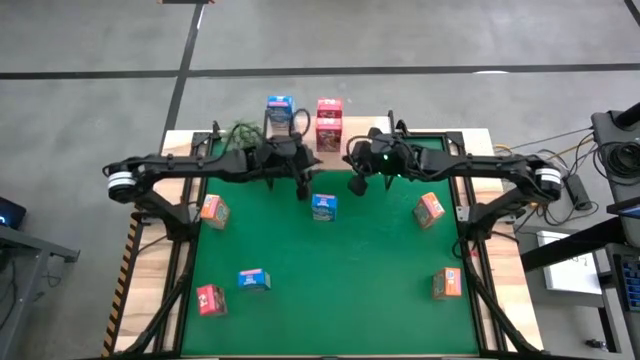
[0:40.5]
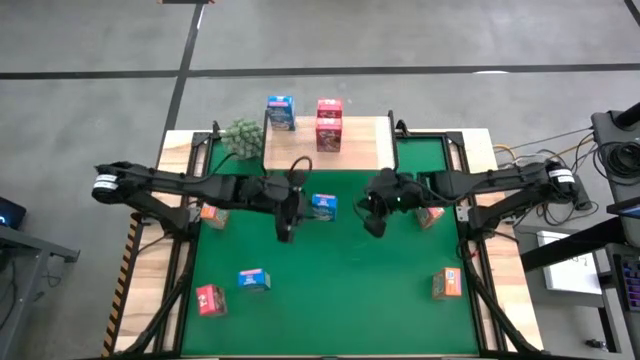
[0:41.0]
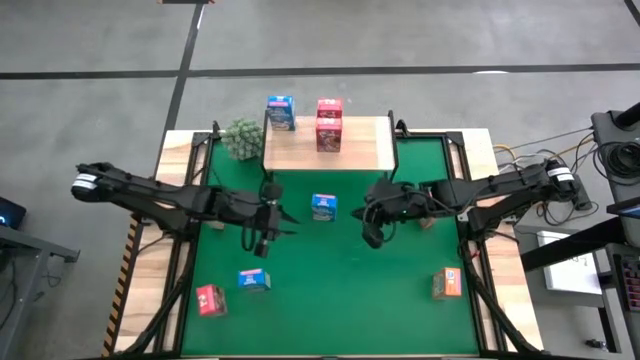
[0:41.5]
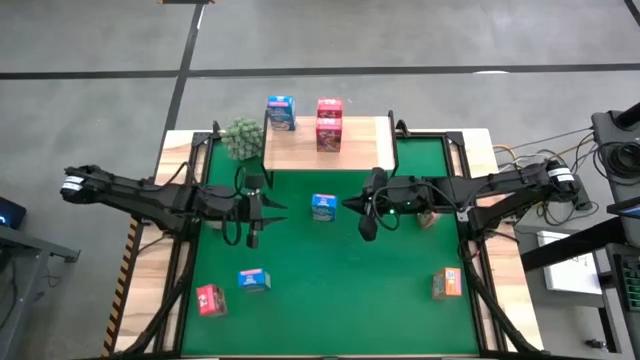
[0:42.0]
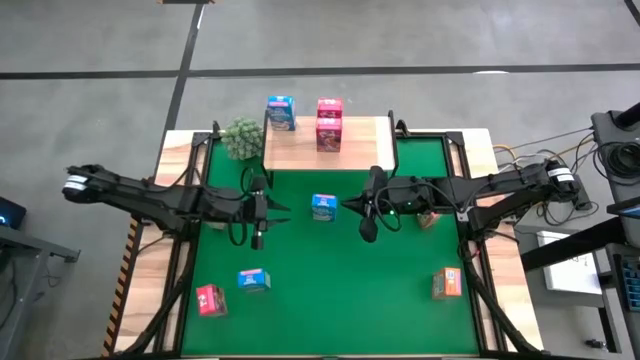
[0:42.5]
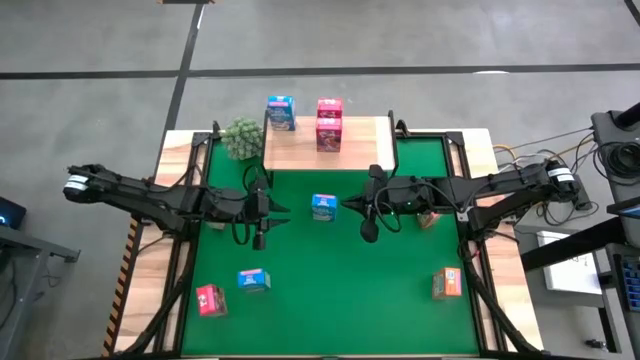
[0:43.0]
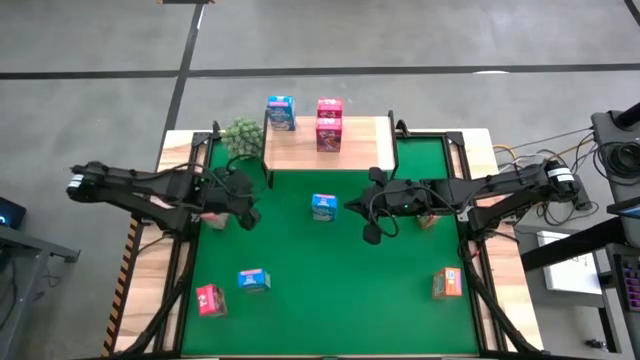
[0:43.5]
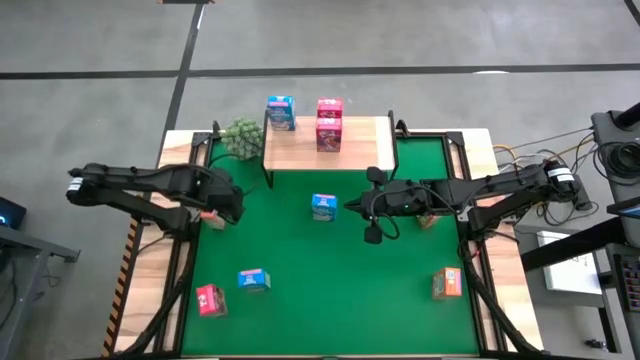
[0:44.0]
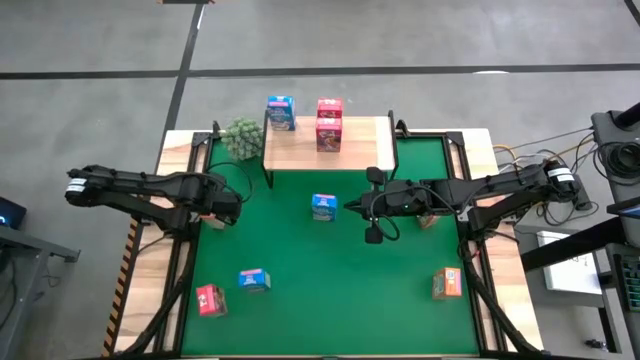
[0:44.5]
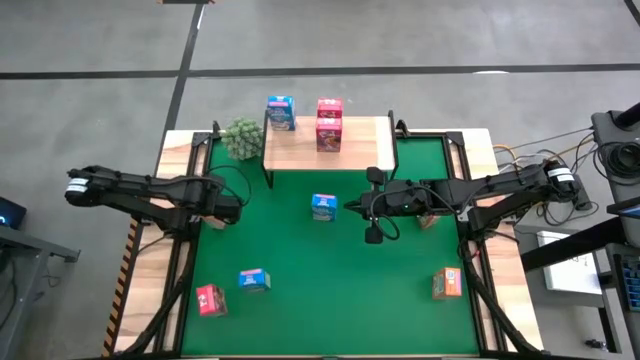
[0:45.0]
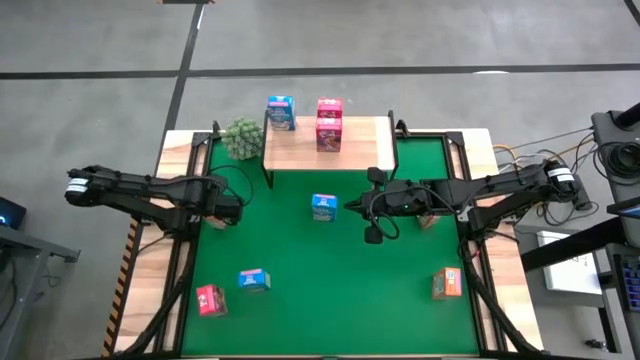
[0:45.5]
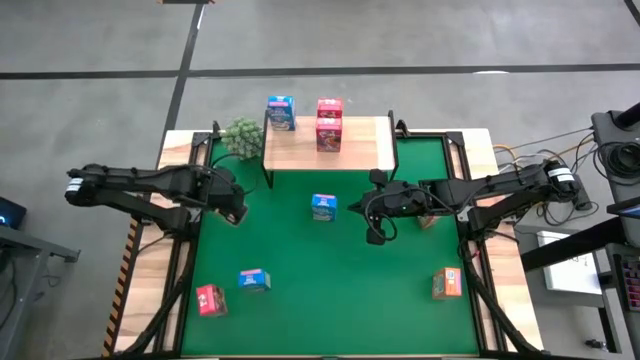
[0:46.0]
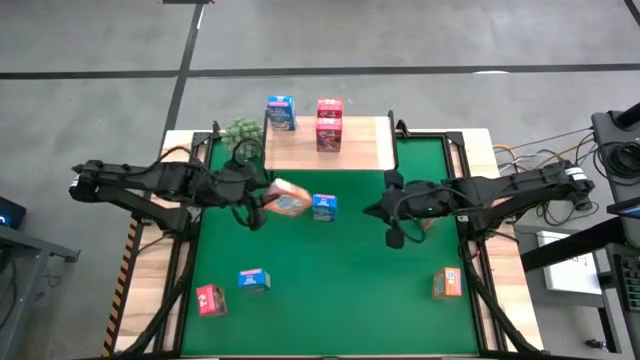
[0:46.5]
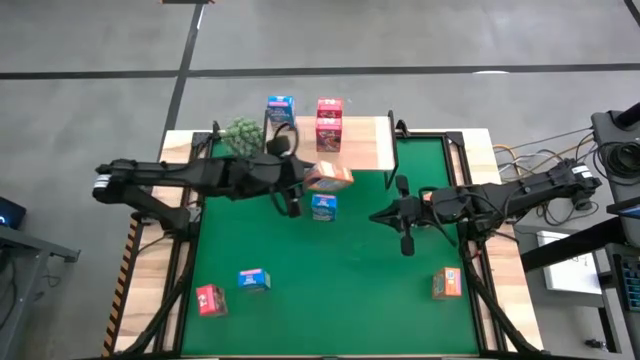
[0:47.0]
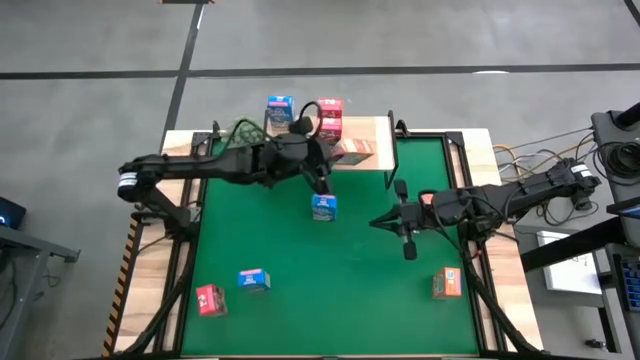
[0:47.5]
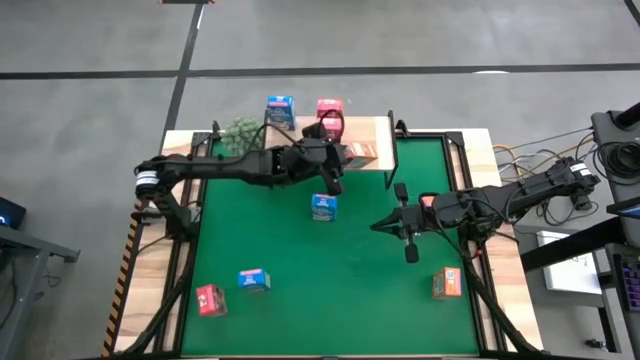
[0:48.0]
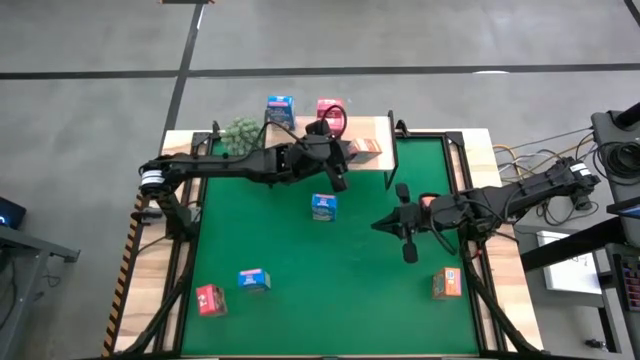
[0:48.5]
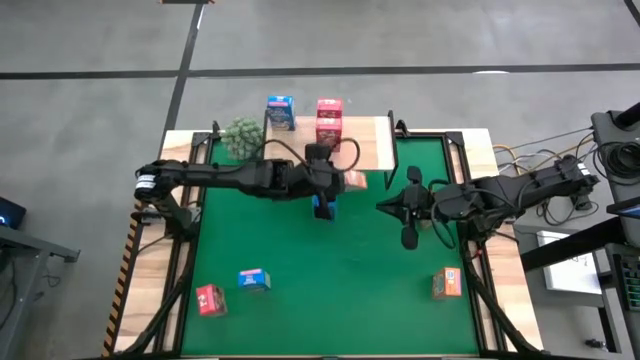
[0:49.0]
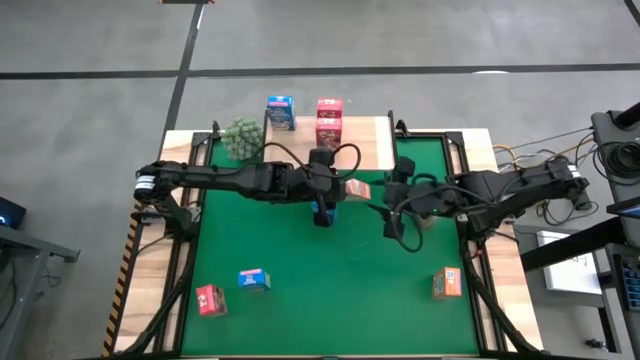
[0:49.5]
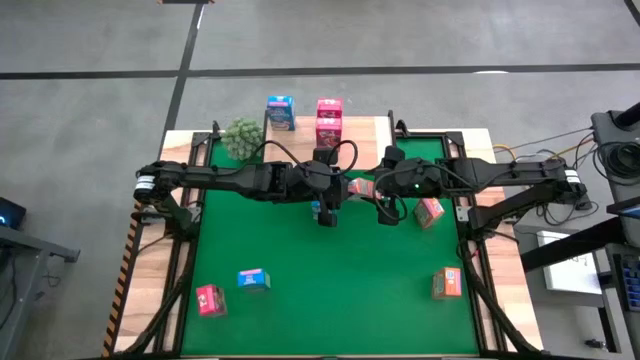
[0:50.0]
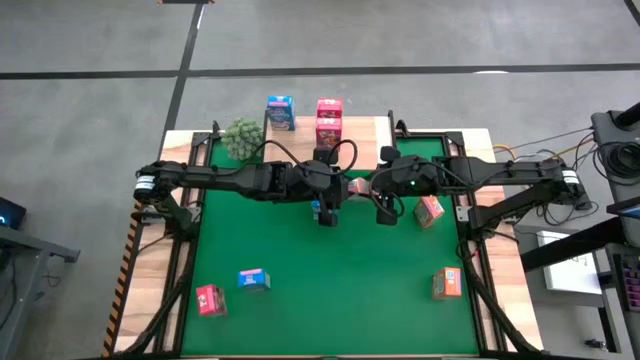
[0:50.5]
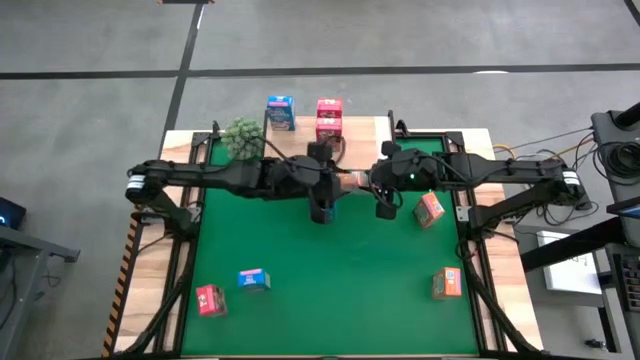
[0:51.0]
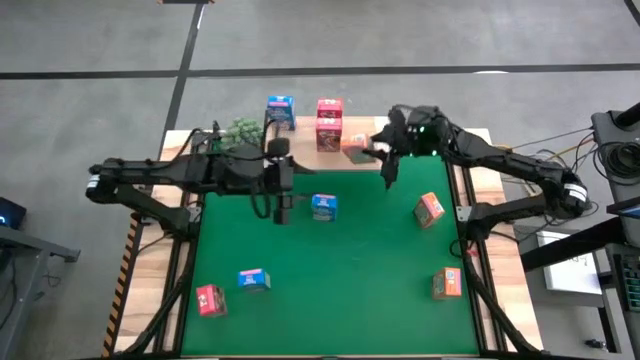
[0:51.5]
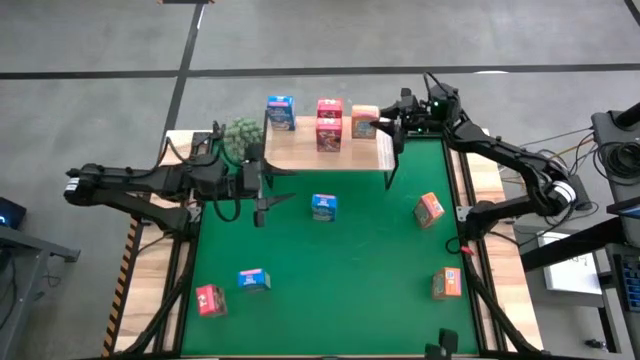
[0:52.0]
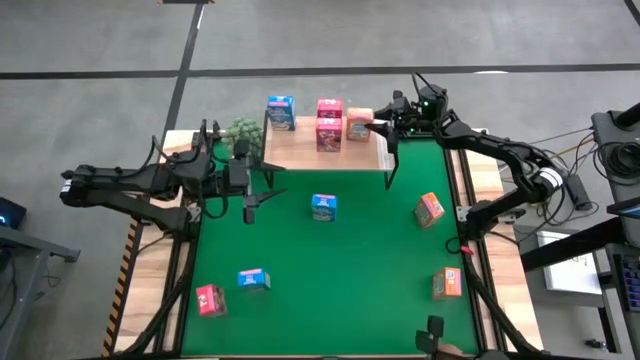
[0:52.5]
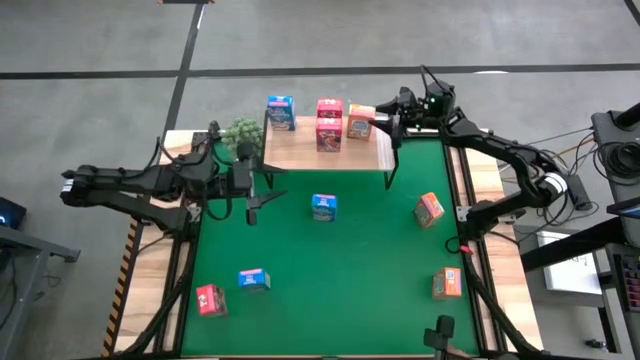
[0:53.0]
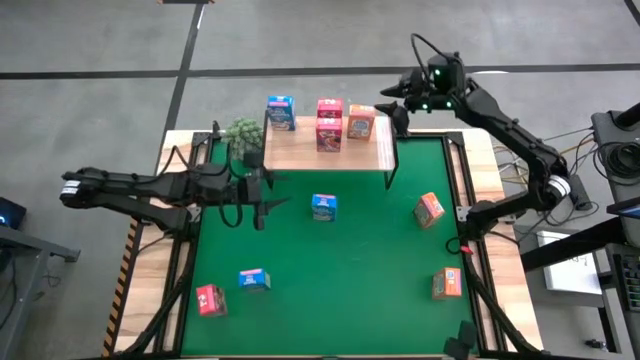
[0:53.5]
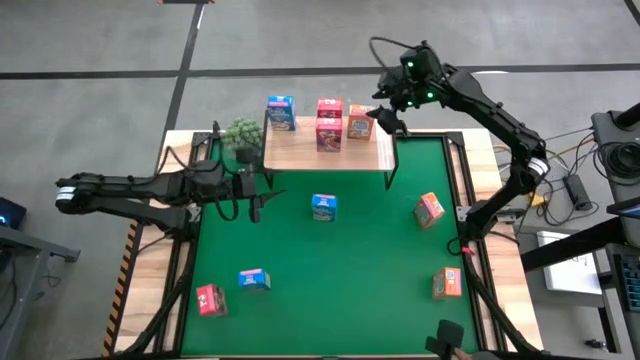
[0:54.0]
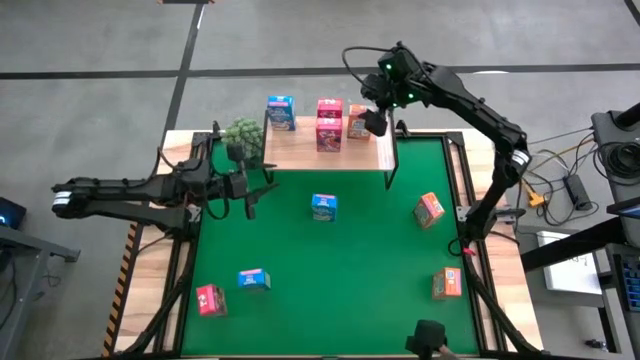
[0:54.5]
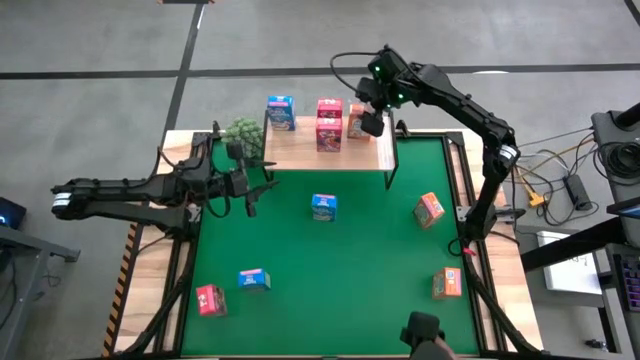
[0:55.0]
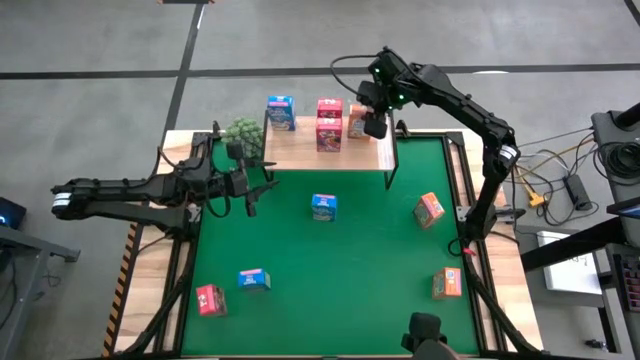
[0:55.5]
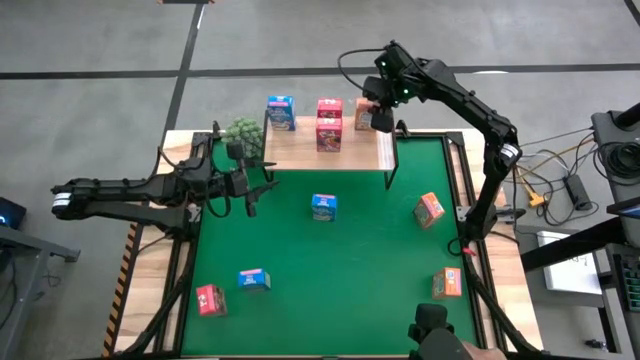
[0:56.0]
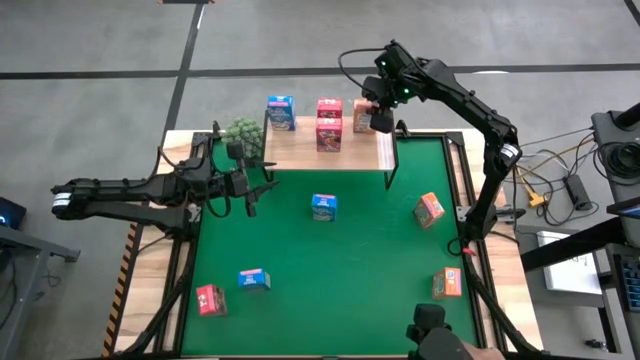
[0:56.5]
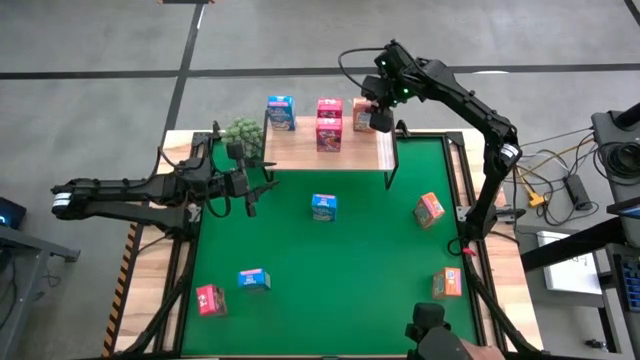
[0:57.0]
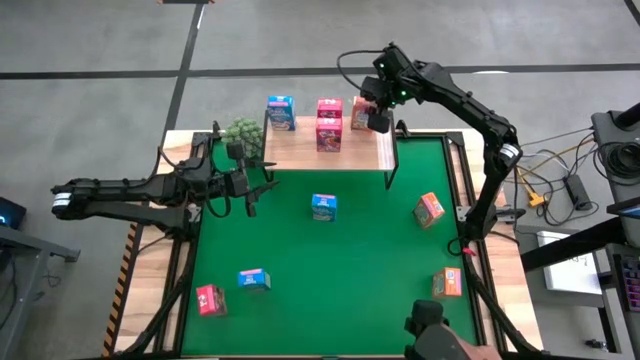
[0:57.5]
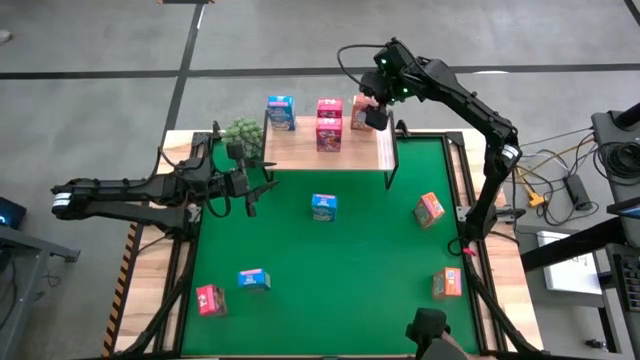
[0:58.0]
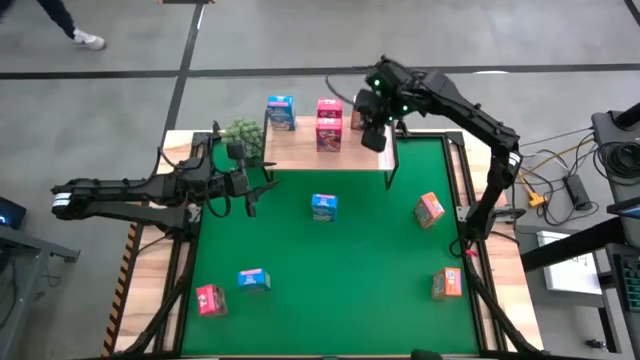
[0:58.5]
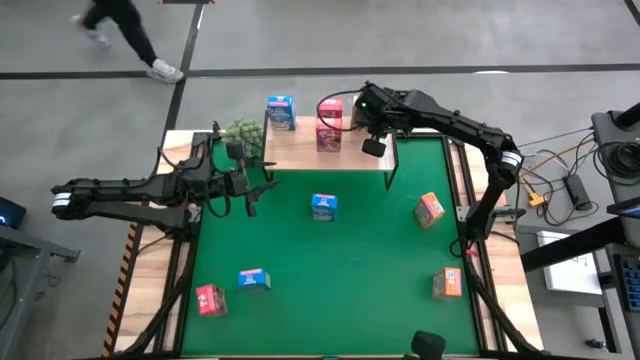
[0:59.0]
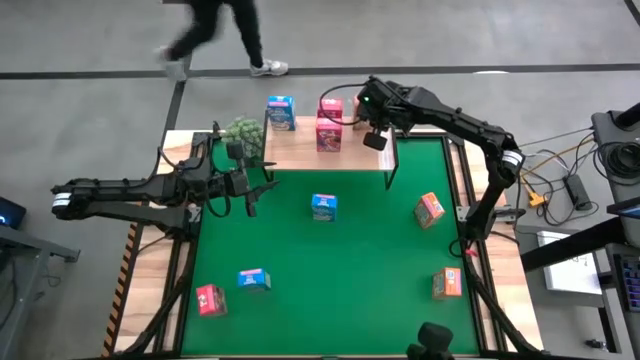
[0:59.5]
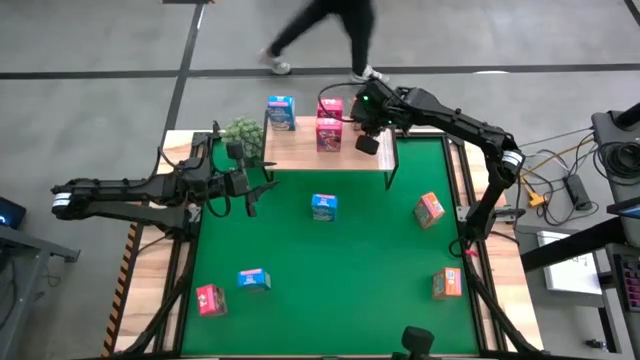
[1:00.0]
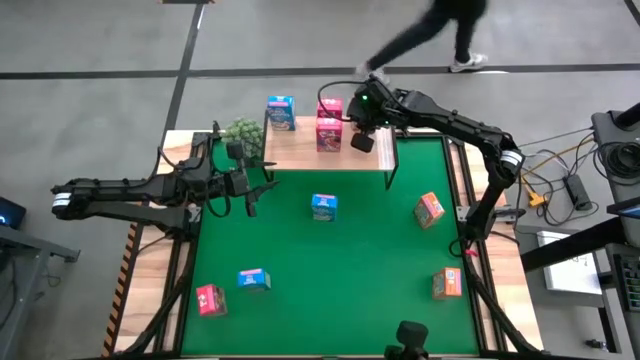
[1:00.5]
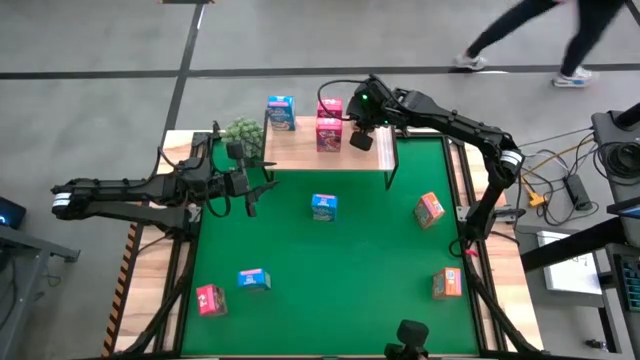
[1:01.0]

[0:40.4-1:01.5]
Task: Stack cereal on shelf
Put the top left orange cereal box on the shelf
